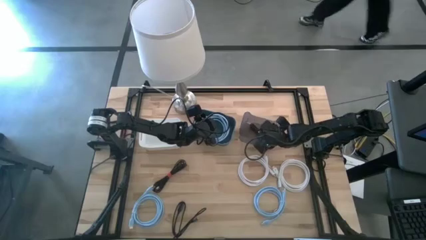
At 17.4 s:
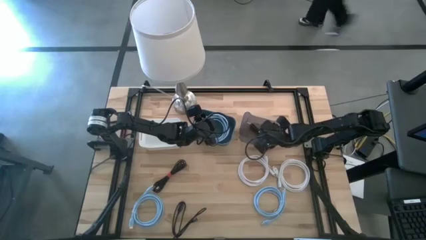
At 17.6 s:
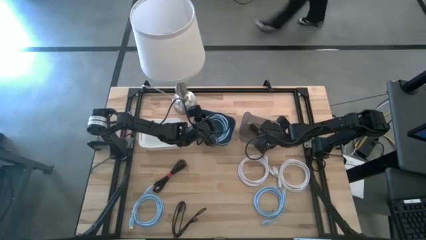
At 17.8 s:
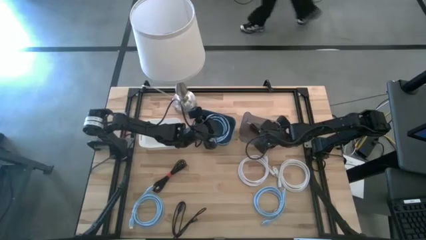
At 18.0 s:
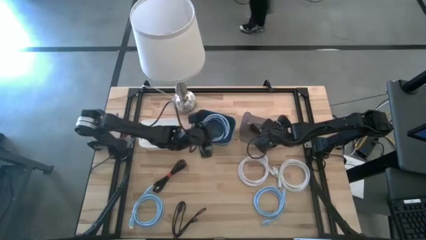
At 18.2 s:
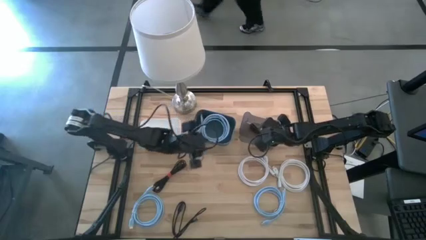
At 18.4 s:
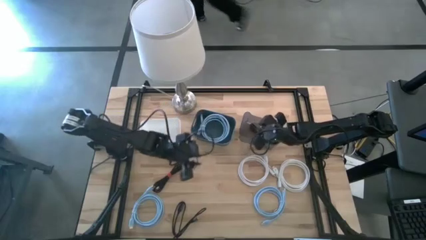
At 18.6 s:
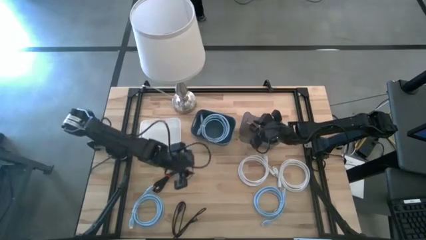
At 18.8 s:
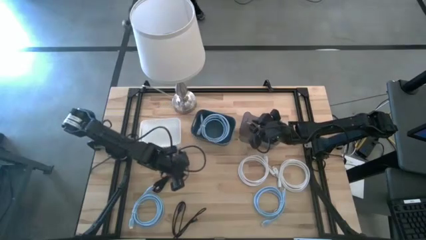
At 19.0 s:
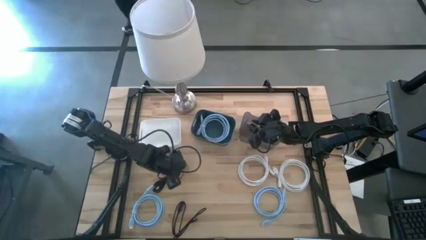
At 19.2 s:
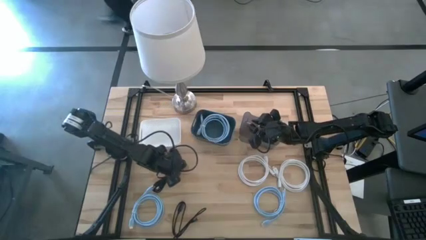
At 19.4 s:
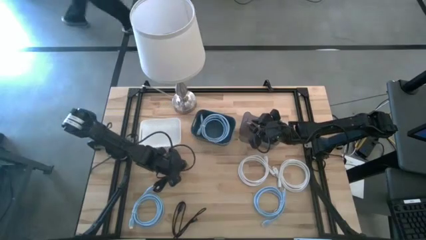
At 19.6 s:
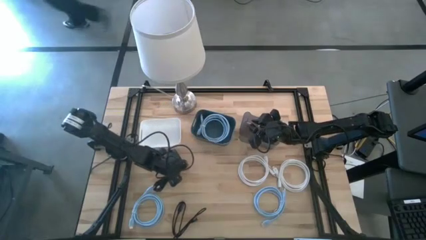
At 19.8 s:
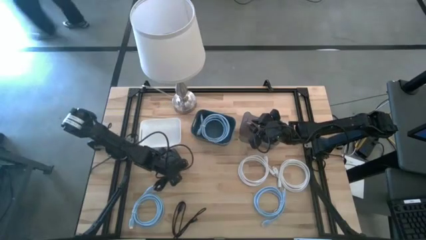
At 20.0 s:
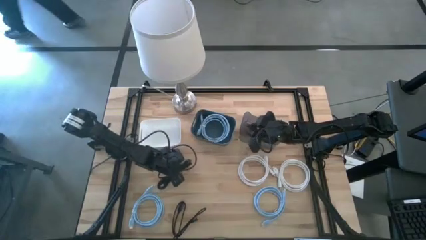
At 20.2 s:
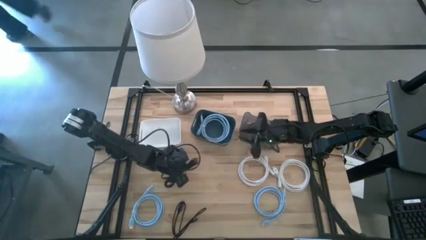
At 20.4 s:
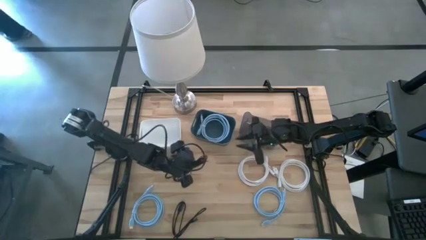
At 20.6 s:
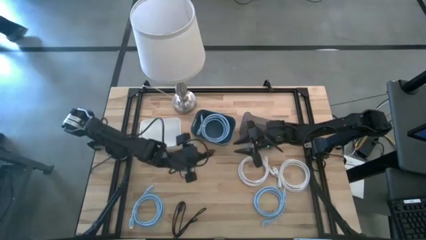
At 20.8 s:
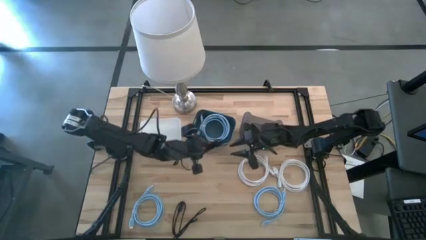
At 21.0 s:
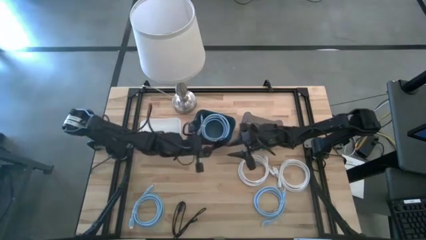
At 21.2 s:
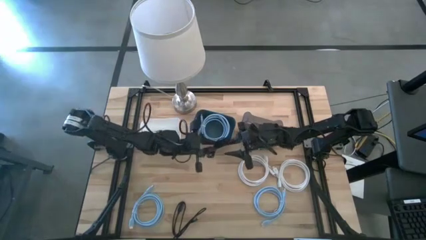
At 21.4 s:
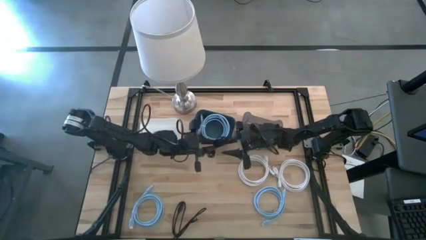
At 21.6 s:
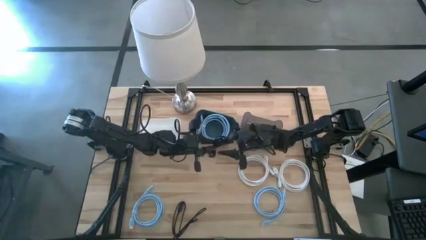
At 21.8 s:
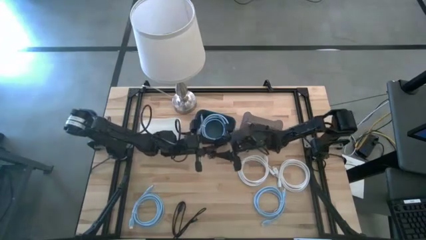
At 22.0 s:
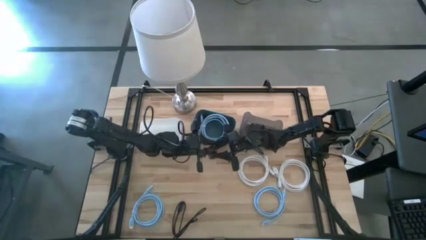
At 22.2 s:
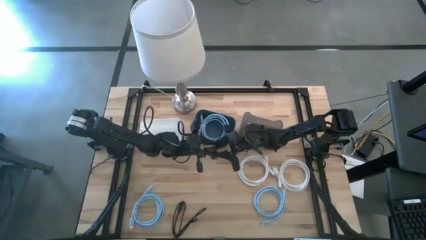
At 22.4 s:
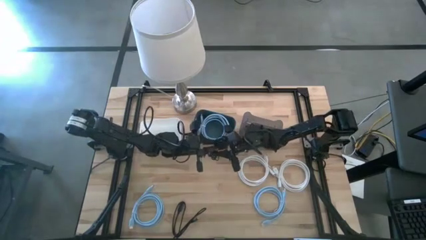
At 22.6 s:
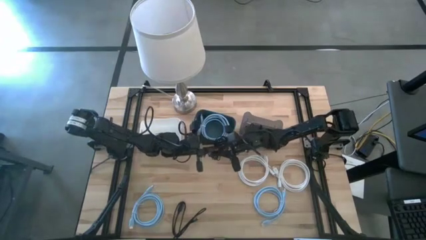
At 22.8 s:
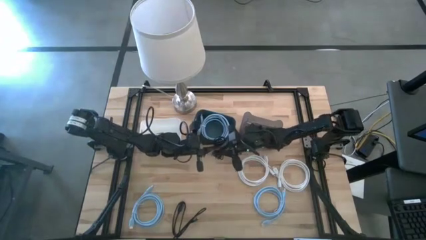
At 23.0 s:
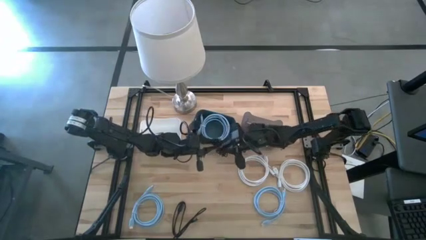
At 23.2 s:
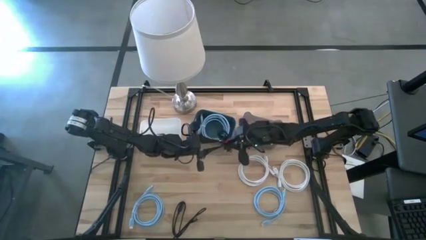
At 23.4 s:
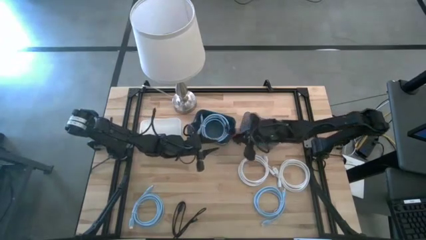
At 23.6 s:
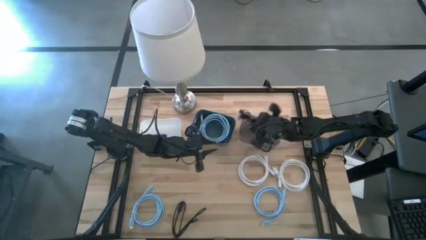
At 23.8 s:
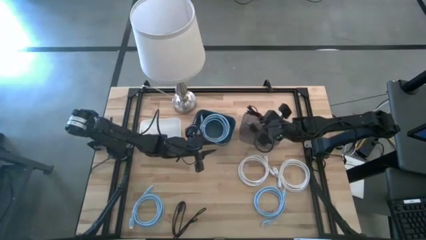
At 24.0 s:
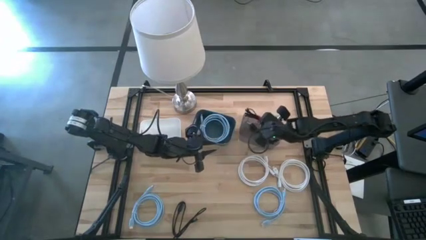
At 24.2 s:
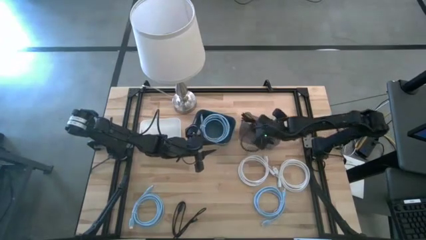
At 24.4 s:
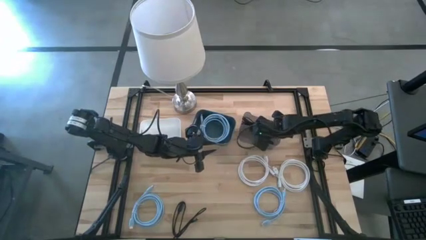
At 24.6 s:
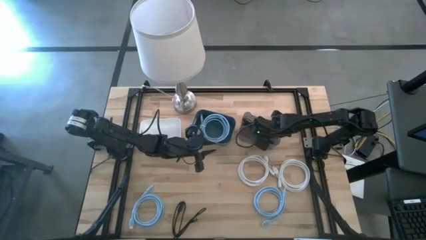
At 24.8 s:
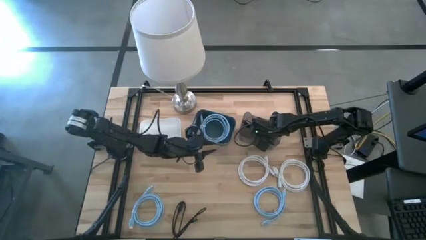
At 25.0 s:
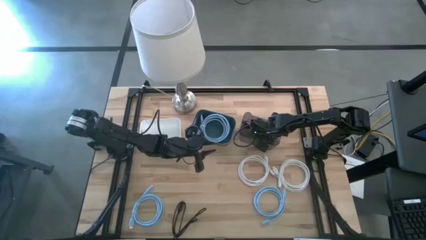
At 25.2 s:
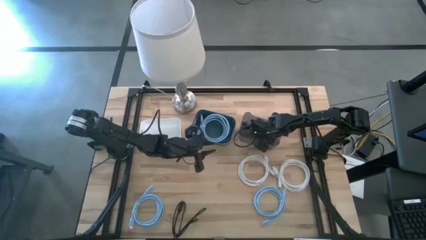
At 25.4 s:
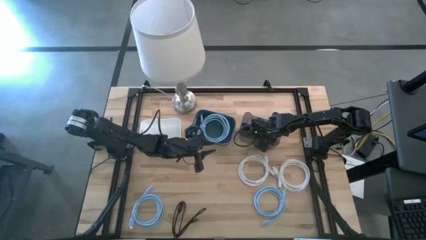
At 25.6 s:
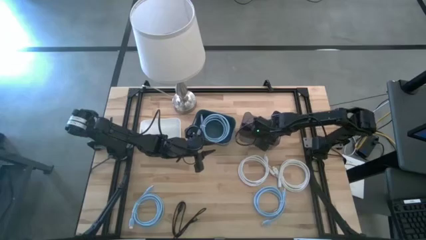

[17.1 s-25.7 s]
Task: Pick & Place USB Port
Put the top black charger cable into the black bin

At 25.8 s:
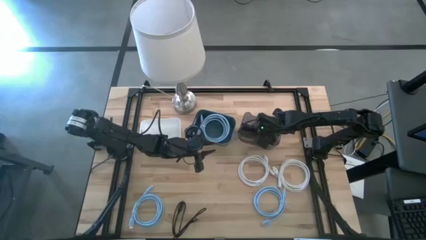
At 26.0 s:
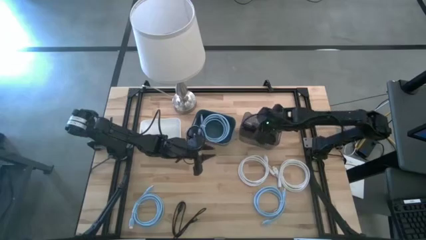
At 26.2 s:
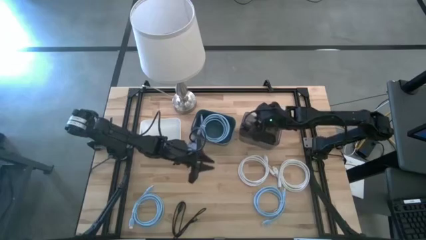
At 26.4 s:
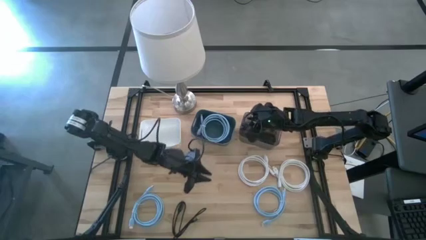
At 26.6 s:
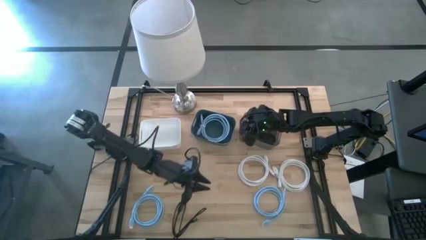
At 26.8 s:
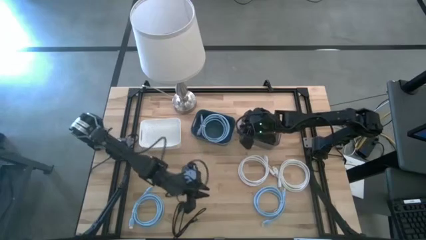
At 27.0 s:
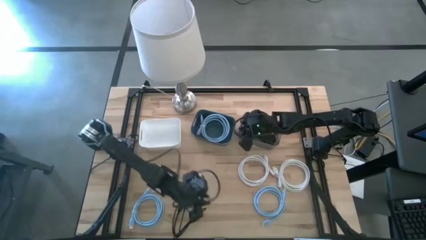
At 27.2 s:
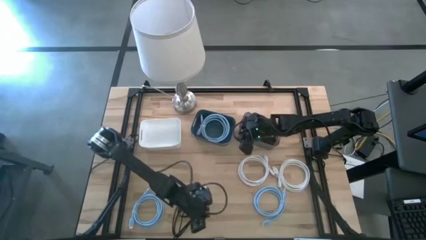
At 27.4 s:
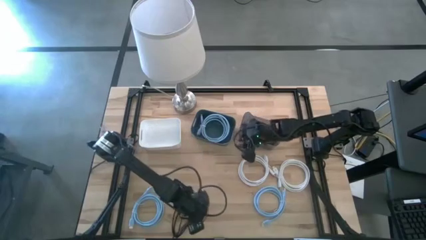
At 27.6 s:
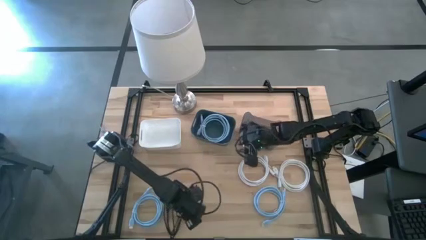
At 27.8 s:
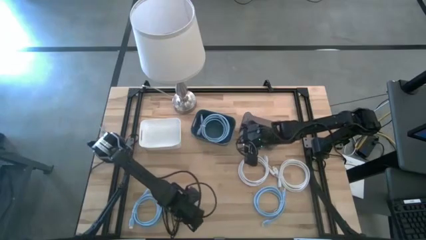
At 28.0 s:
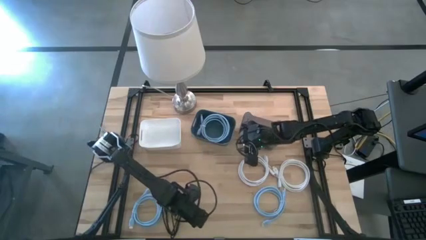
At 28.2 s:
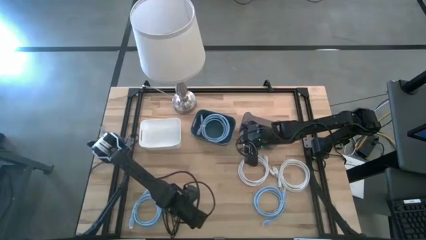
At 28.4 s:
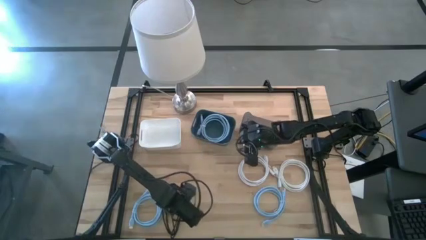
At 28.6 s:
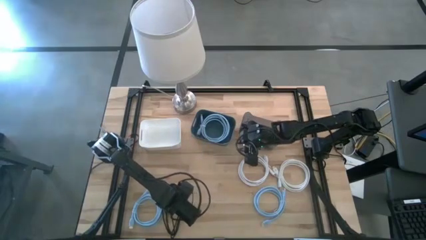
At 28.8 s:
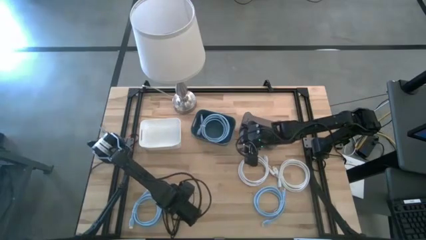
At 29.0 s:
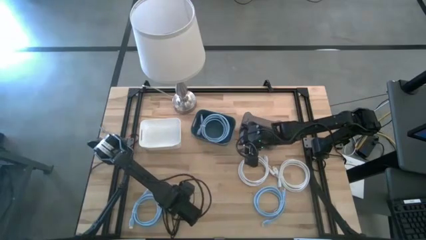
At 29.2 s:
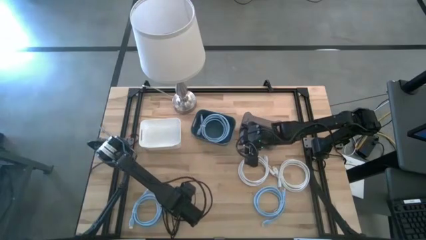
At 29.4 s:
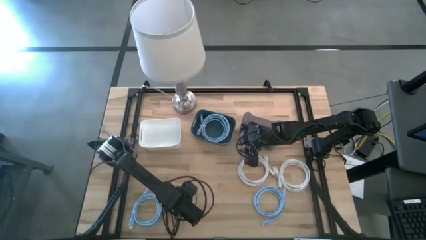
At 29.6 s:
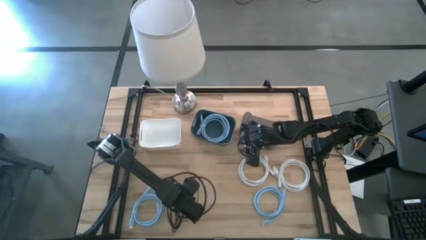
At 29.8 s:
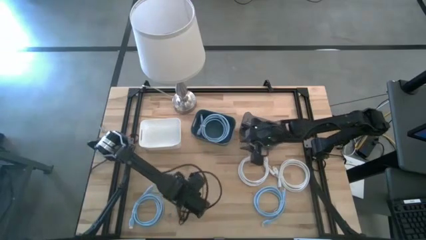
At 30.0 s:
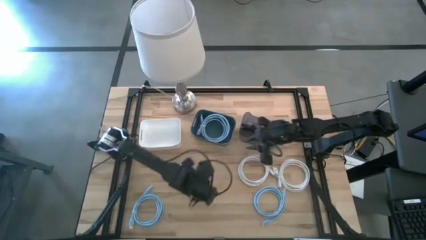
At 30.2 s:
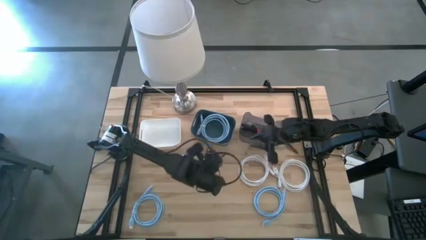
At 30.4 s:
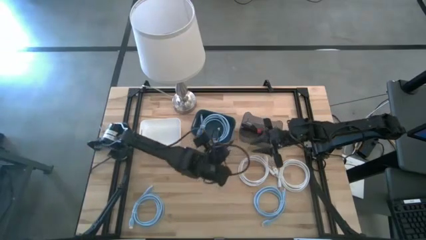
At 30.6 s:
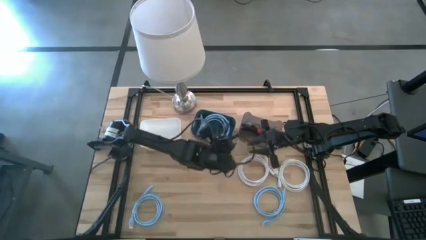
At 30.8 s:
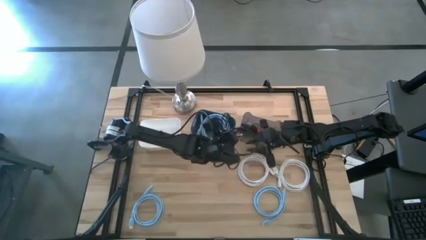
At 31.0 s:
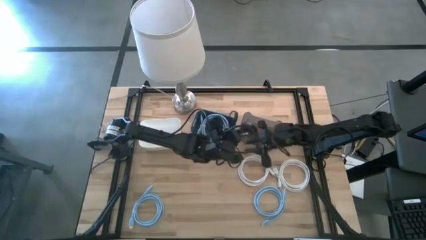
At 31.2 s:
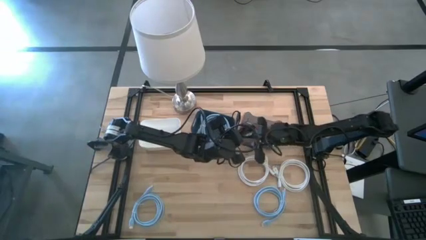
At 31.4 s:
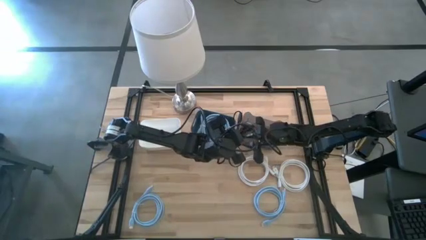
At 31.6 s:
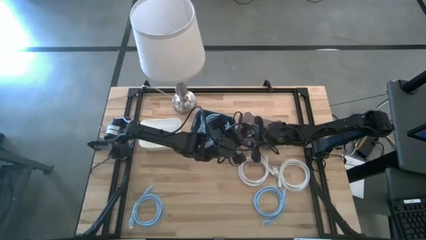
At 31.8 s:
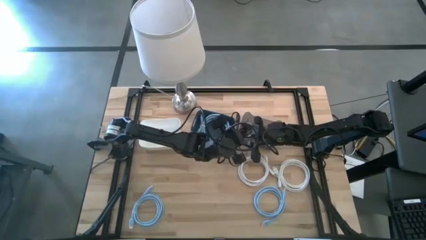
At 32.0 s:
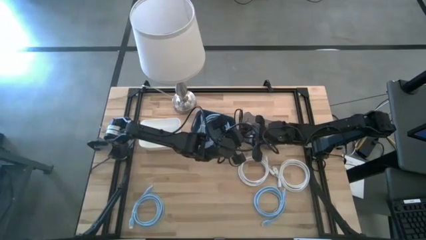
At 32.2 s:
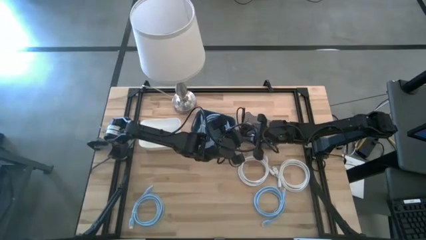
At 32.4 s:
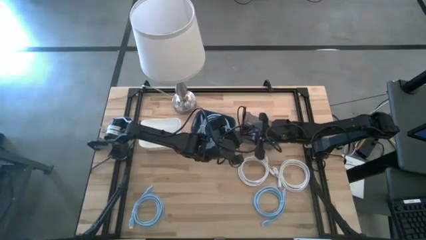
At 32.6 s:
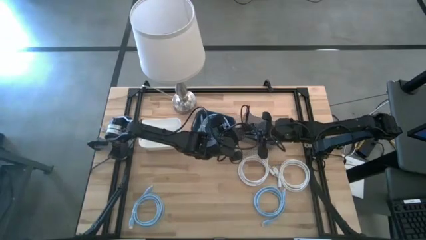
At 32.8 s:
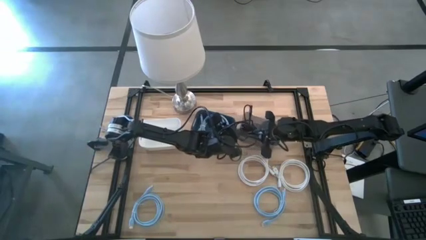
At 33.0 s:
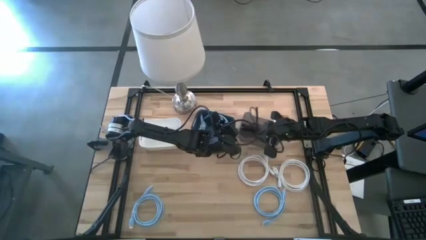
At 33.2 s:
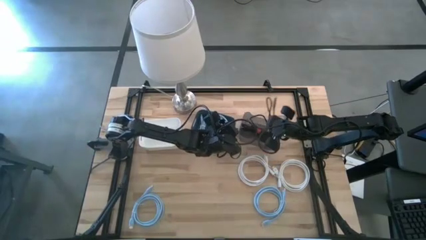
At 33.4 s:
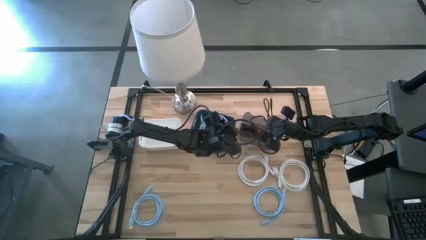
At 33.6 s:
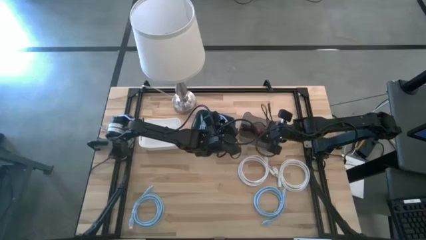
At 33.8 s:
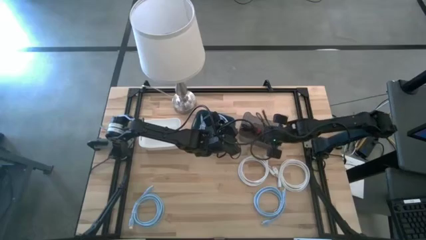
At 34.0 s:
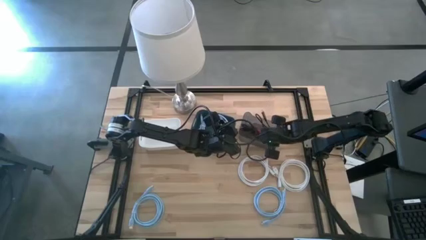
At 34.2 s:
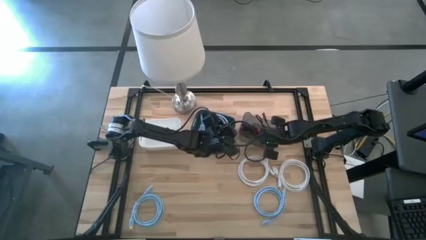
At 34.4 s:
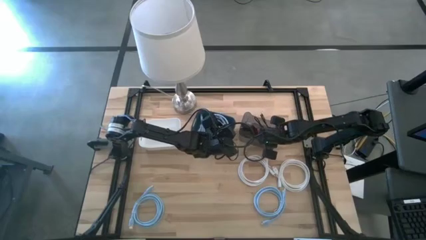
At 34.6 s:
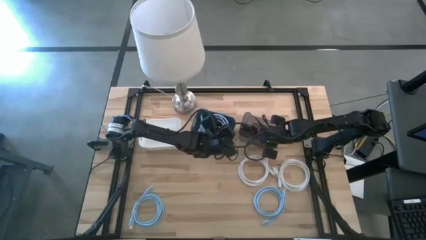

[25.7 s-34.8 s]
Put the black charger cable into the black bin
